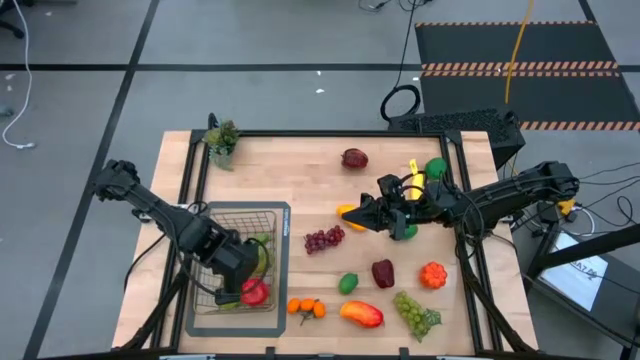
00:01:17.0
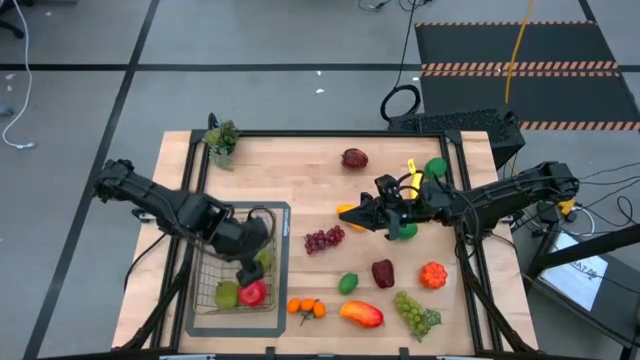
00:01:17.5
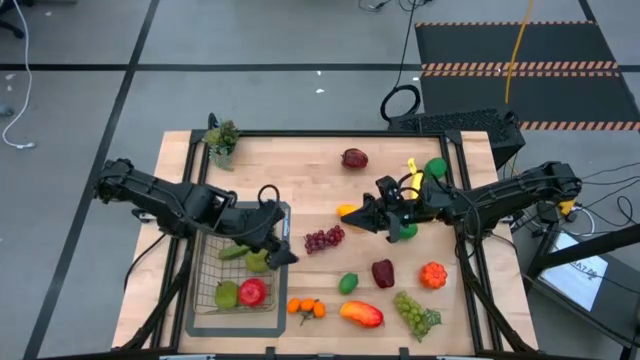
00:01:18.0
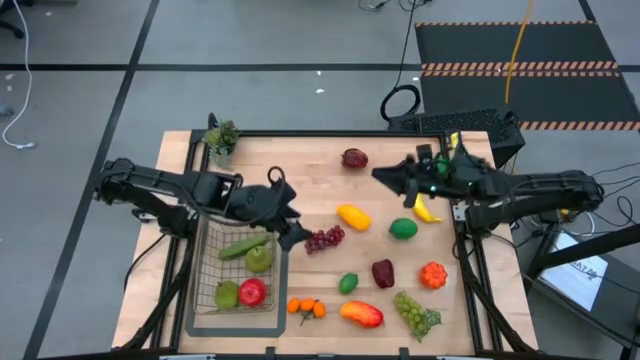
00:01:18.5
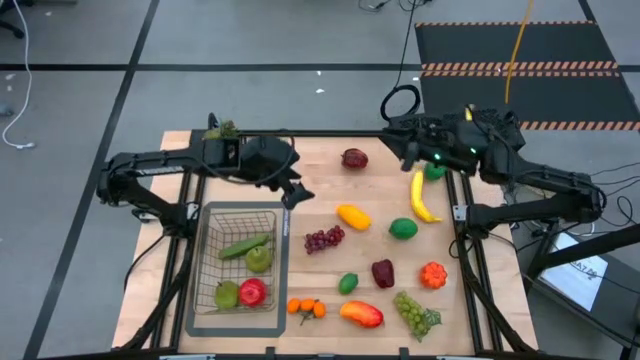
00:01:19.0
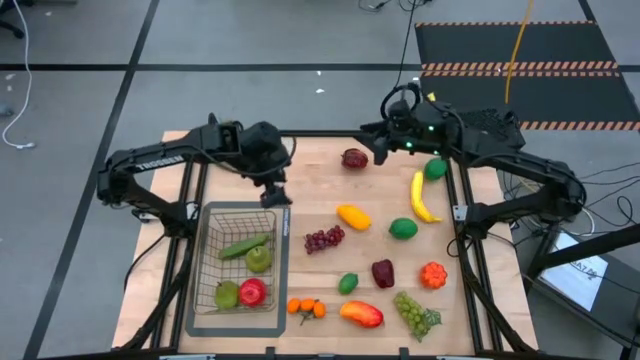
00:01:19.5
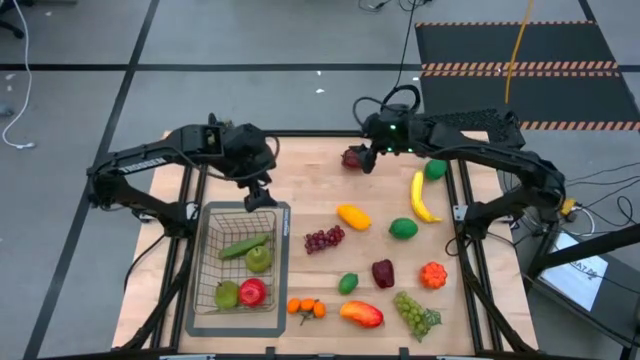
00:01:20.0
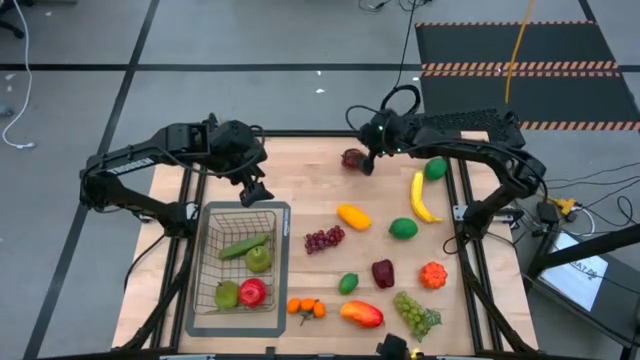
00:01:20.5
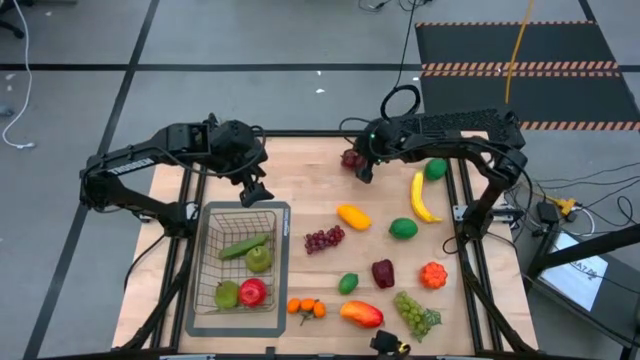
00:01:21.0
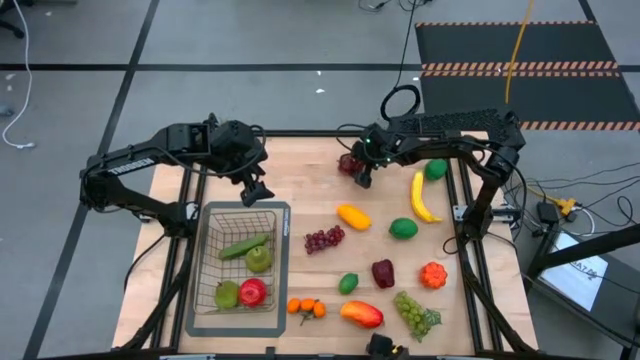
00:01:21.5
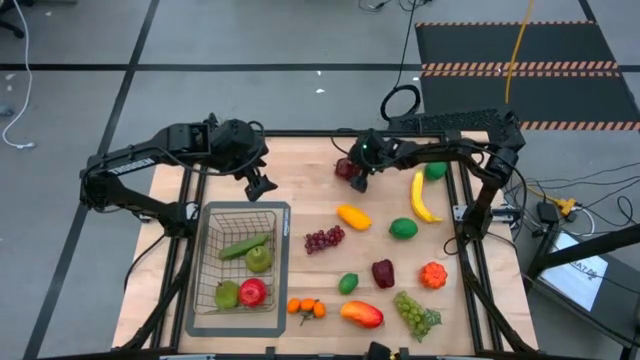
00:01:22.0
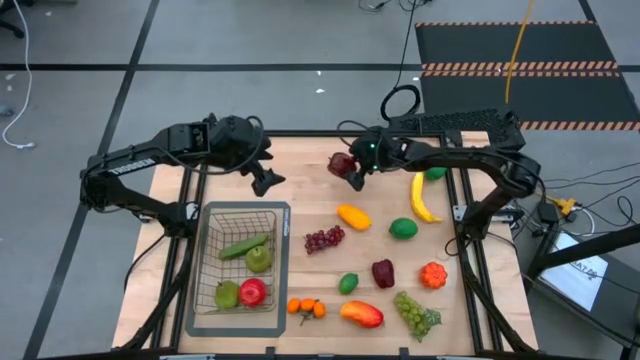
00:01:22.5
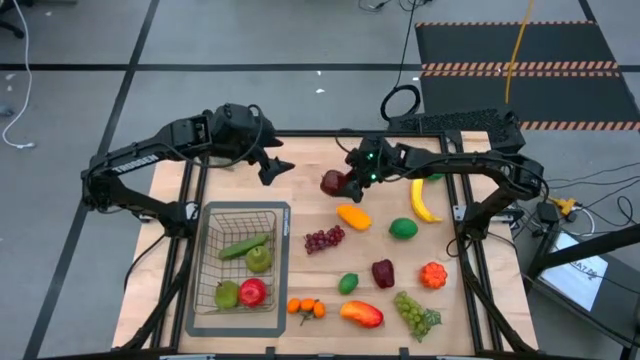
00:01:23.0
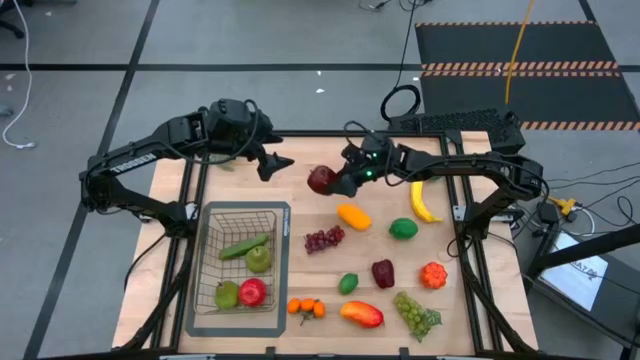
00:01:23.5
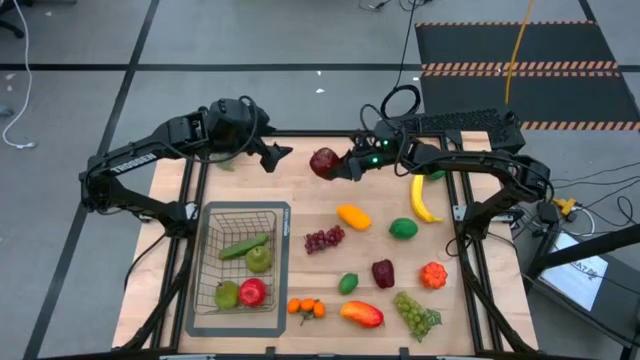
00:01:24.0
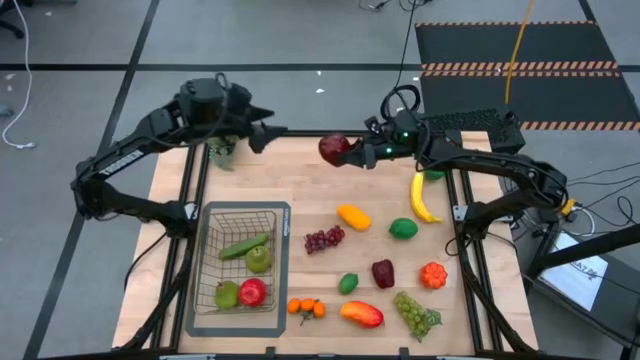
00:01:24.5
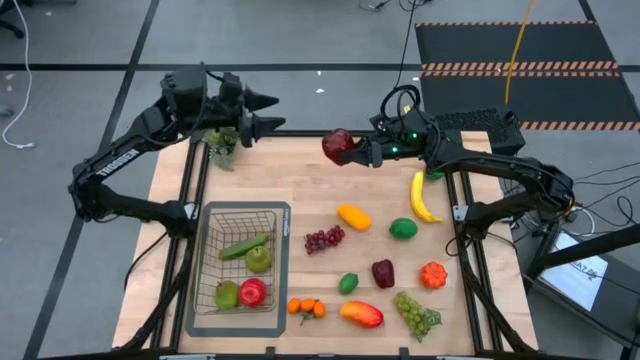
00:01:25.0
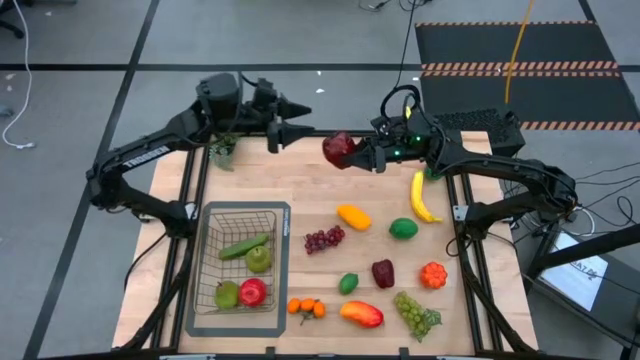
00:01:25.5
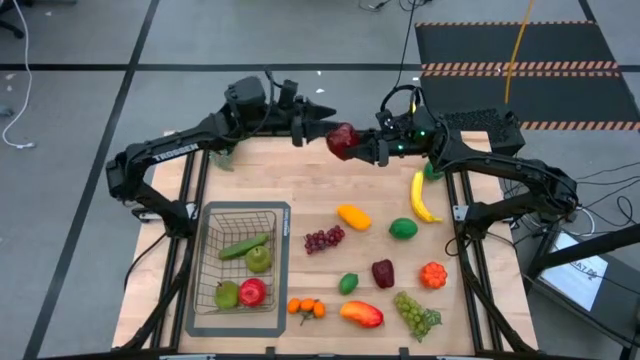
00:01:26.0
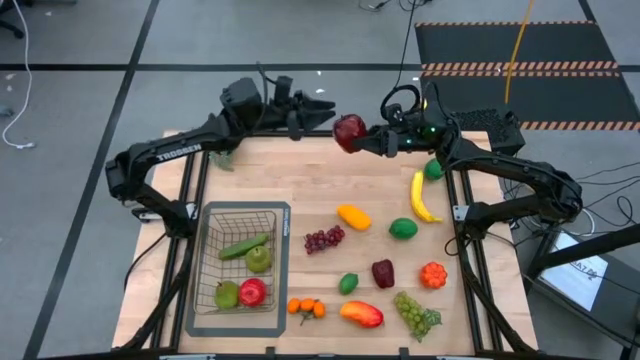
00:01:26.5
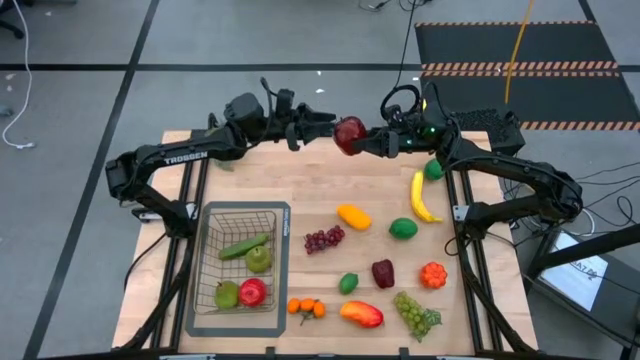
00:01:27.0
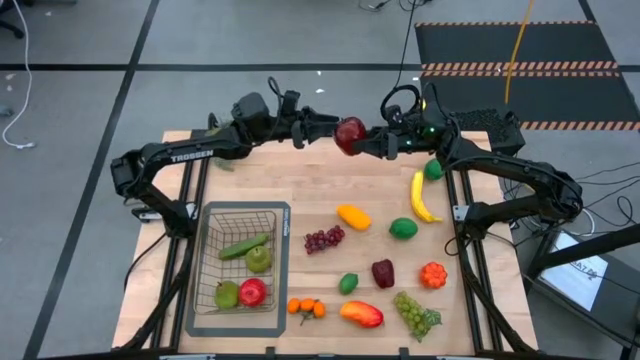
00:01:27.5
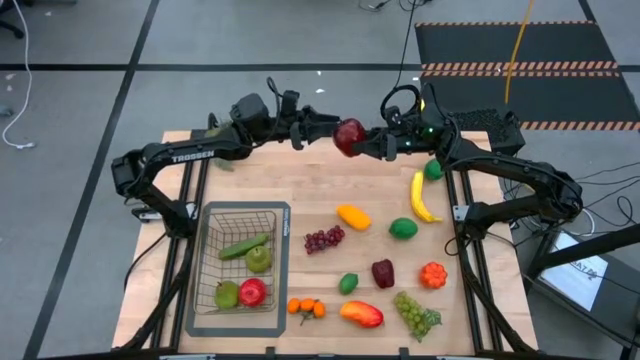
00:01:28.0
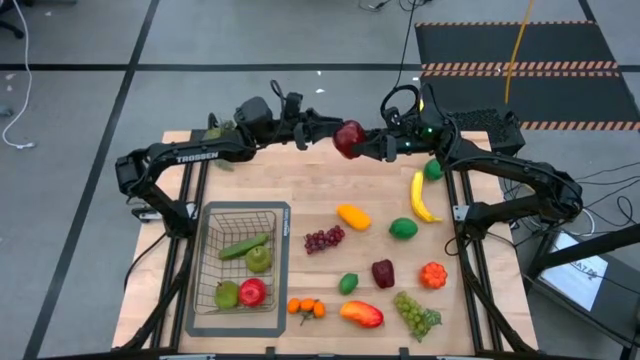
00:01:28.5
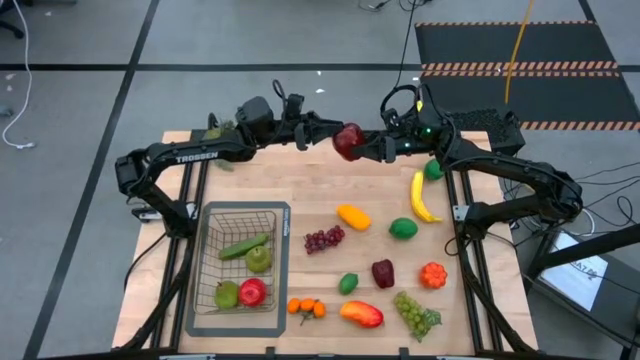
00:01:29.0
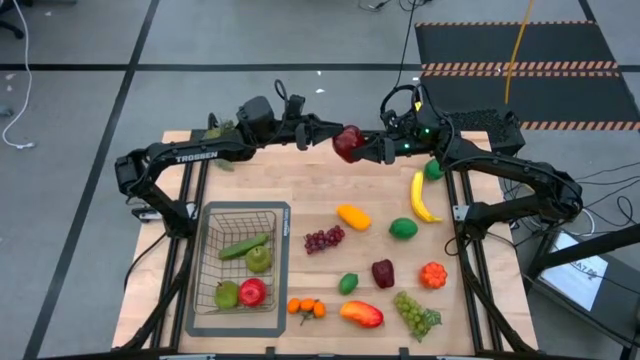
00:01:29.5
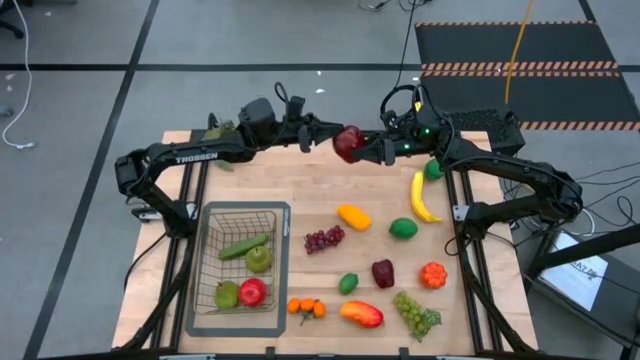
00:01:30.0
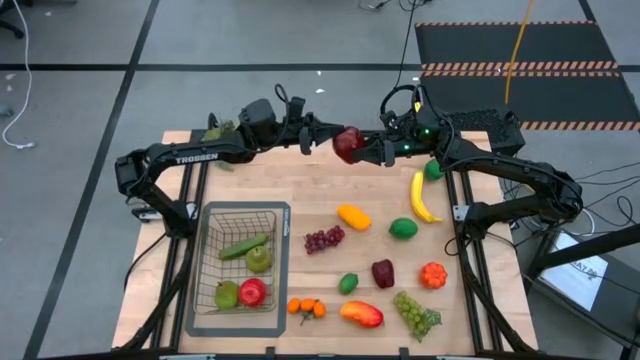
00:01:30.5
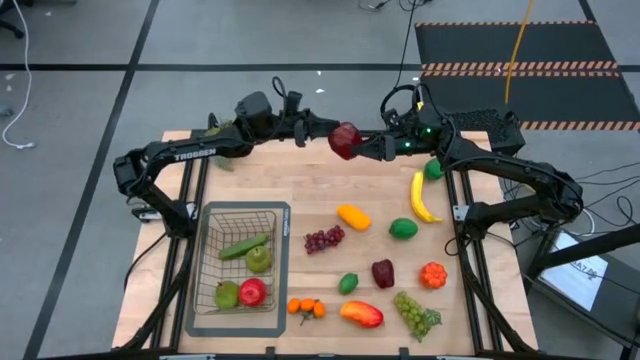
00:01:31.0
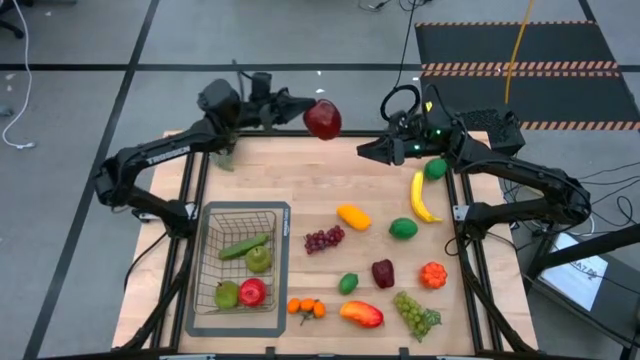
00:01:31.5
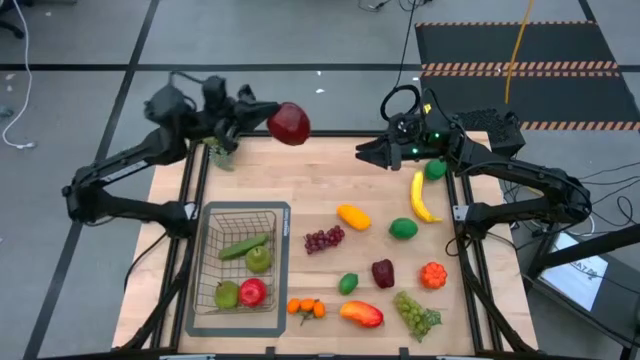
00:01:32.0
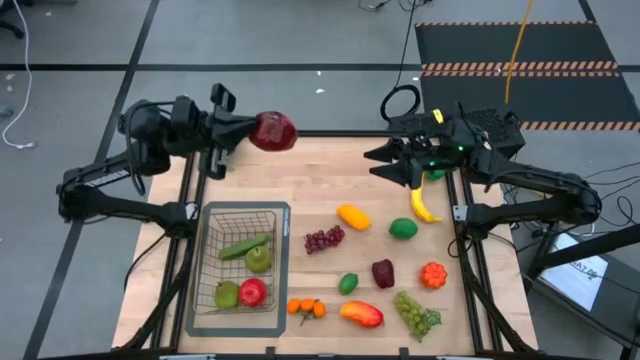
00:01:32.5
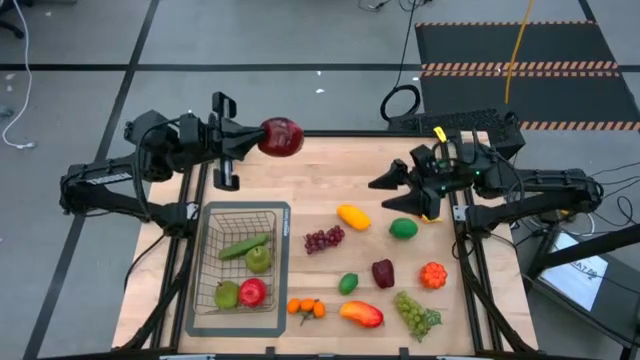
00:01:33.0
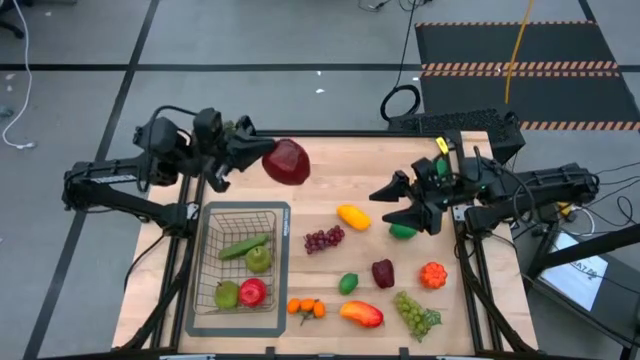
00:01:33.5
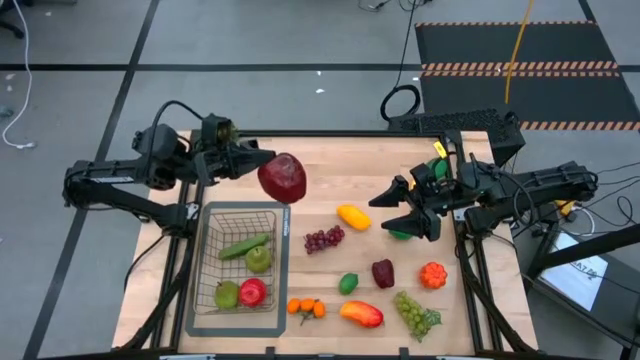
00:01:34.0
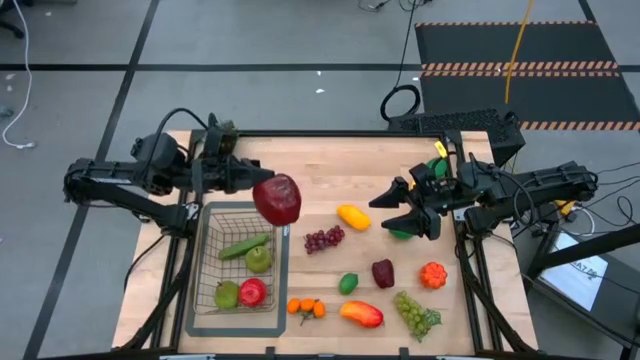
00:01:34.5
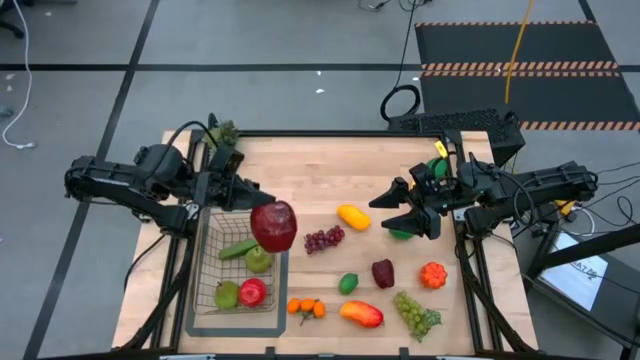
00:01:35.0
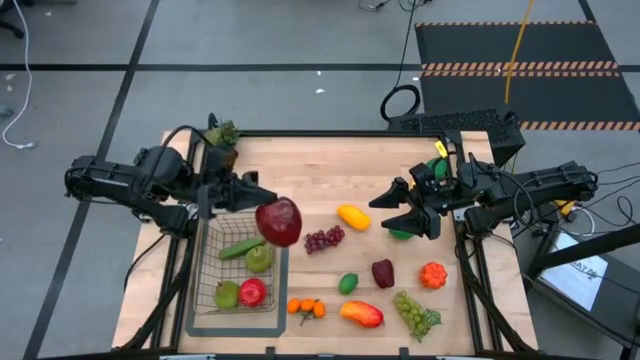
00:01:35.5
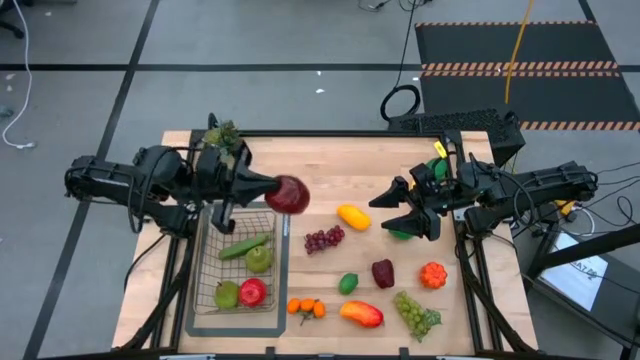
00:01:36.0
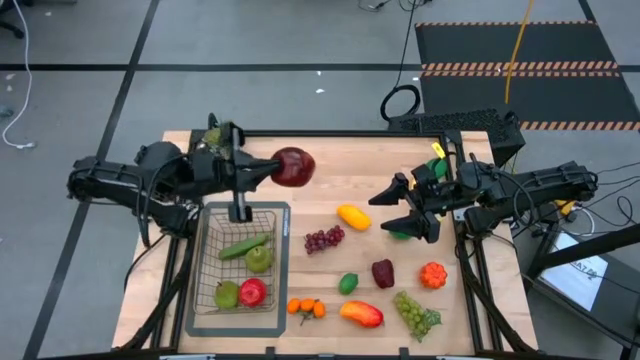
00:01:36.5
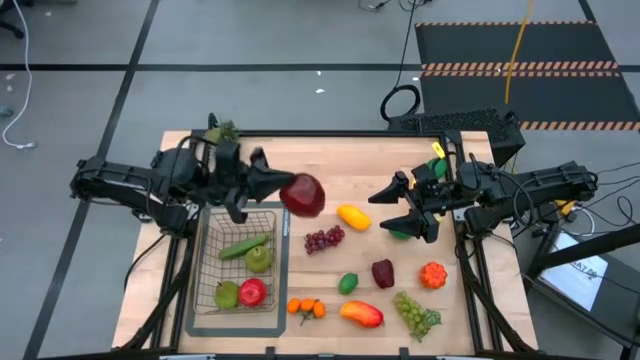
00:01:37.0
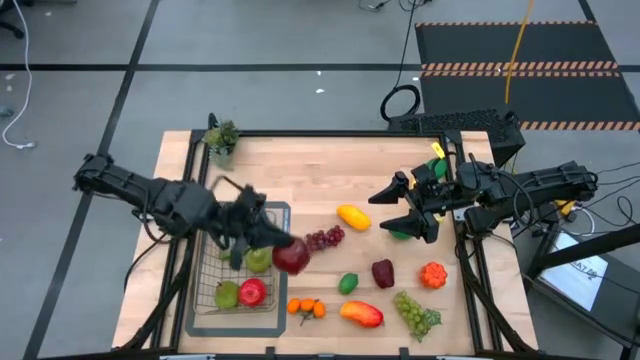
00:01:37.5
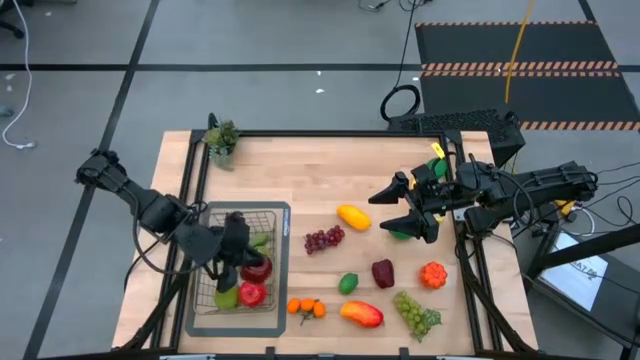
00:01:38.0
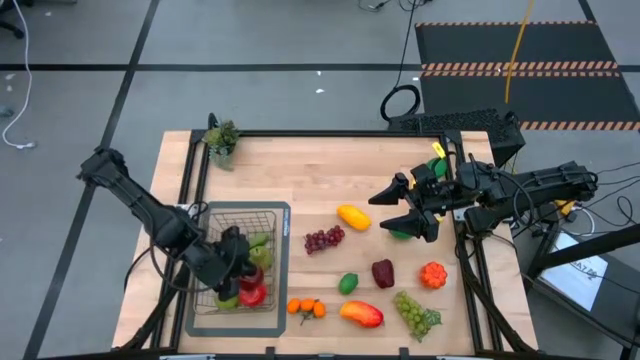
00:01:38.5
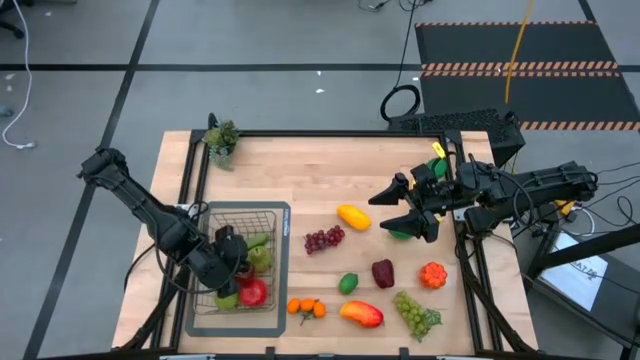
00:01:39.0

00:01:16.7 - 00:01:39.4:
Task: Build produce basket
Put the top dark red apple into the wire basket
